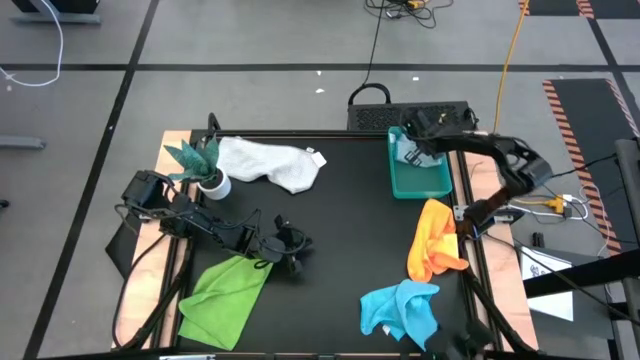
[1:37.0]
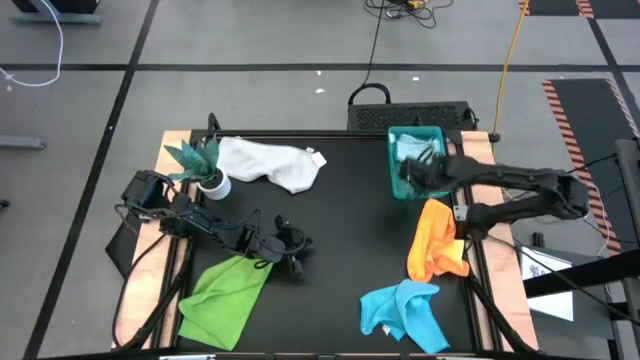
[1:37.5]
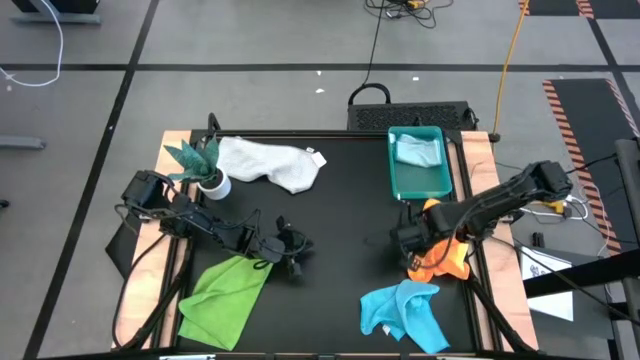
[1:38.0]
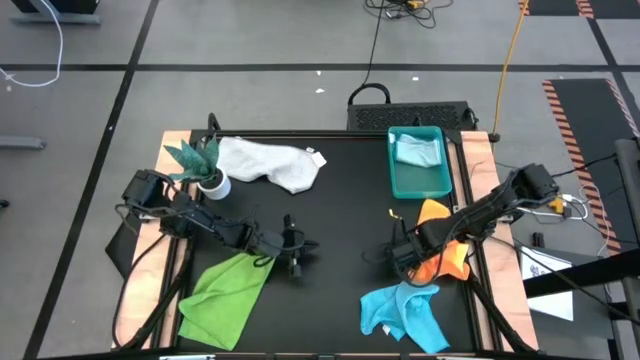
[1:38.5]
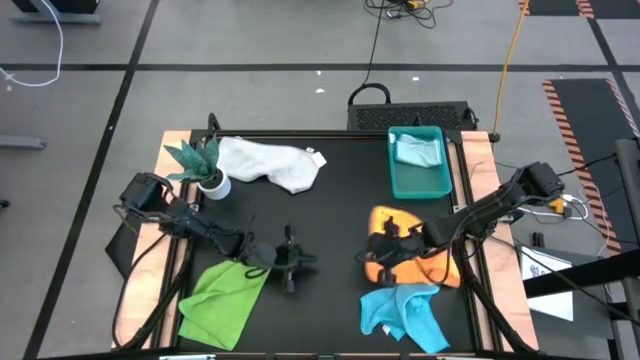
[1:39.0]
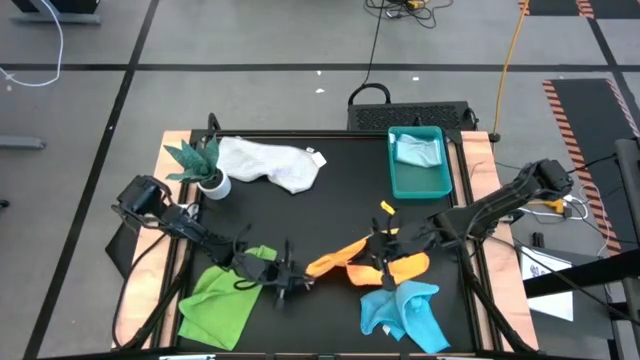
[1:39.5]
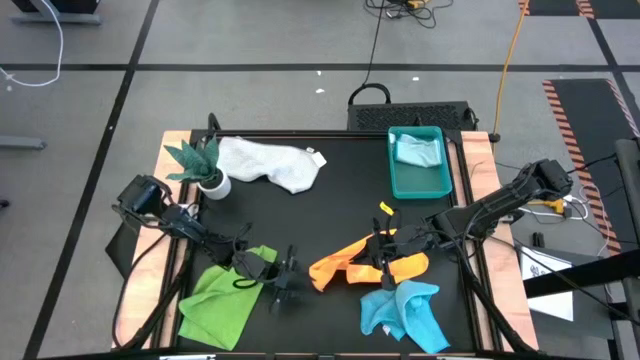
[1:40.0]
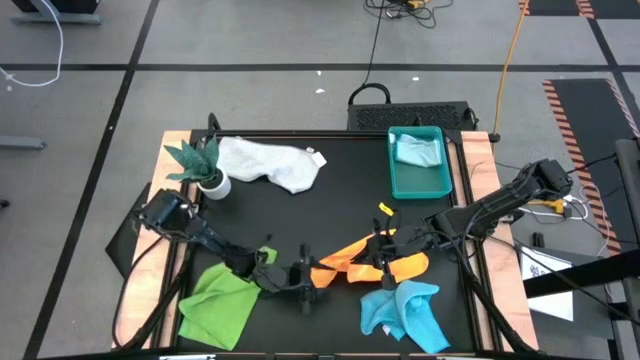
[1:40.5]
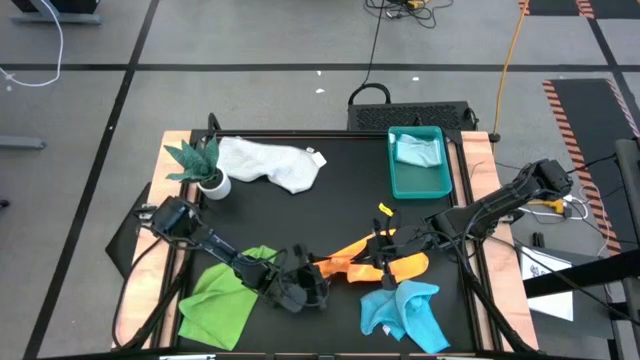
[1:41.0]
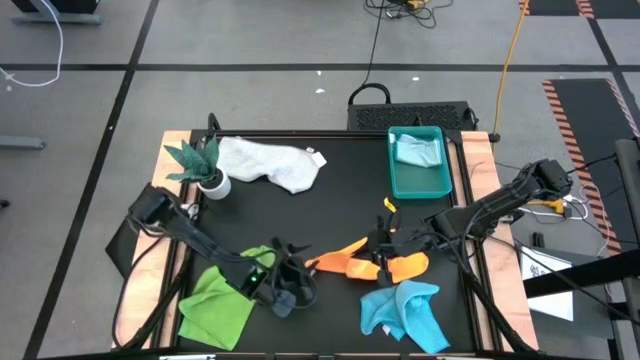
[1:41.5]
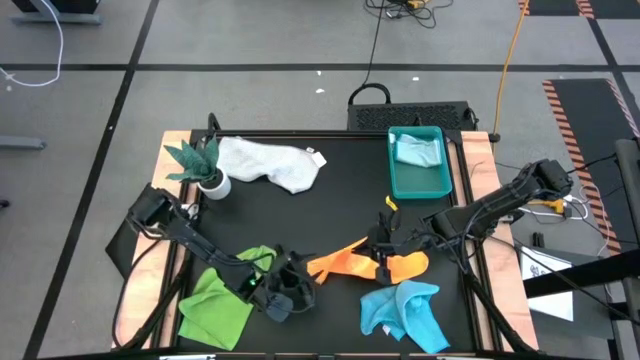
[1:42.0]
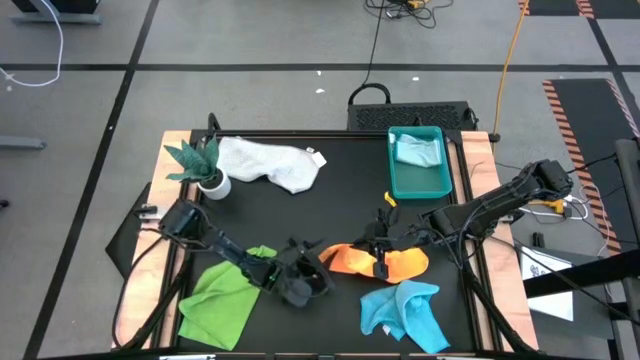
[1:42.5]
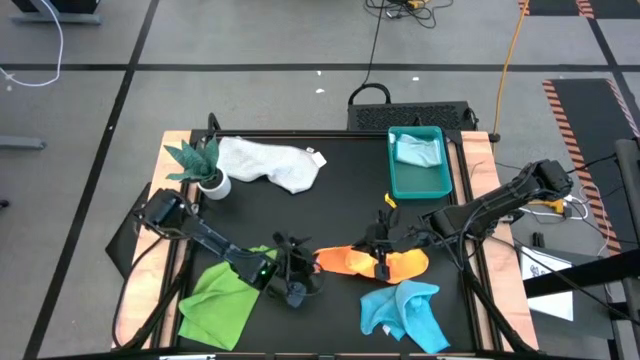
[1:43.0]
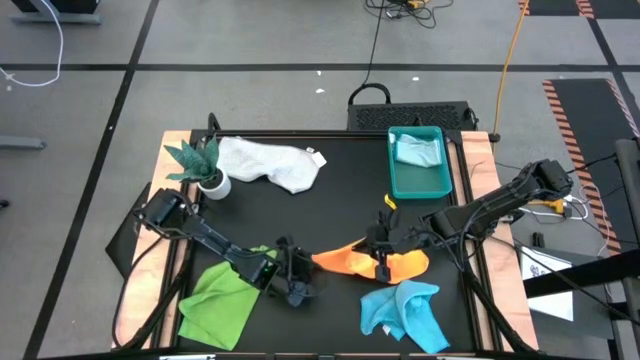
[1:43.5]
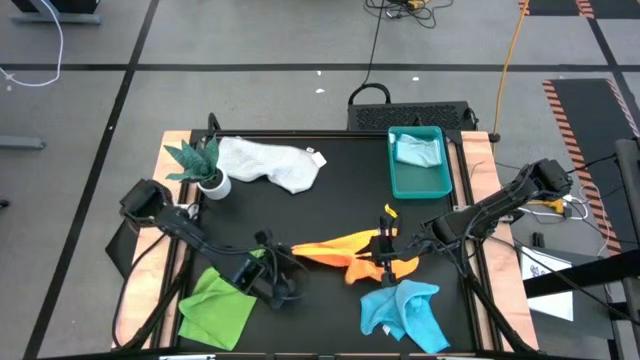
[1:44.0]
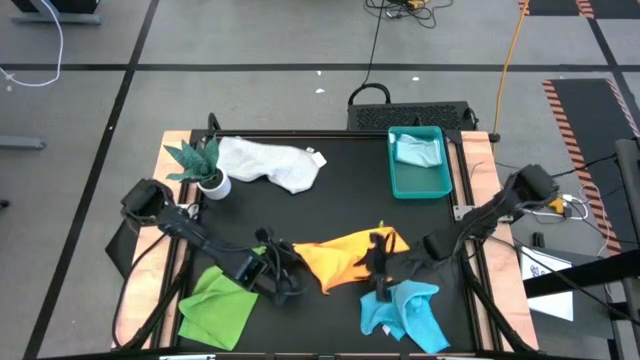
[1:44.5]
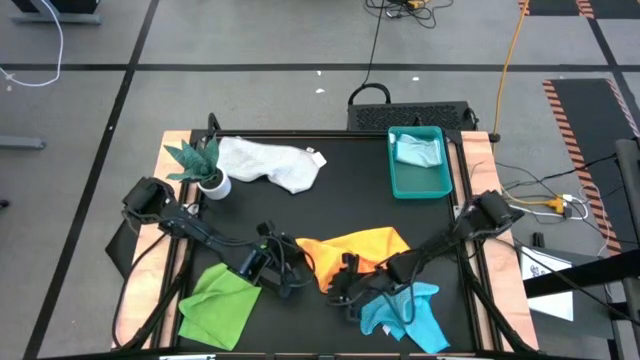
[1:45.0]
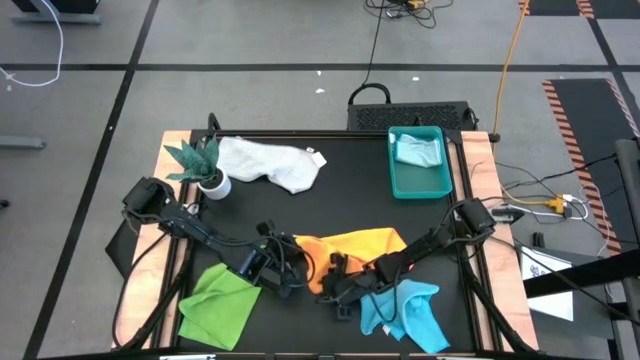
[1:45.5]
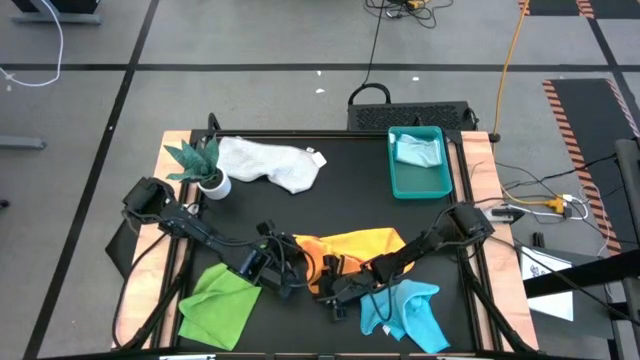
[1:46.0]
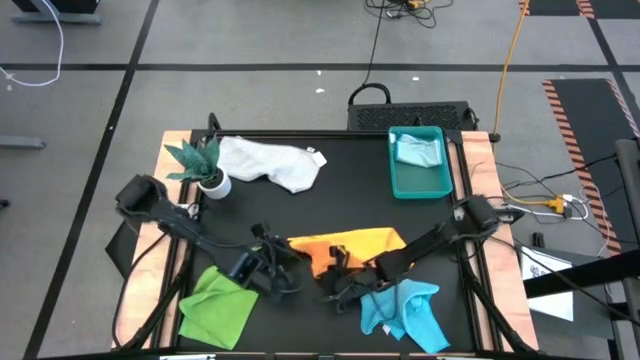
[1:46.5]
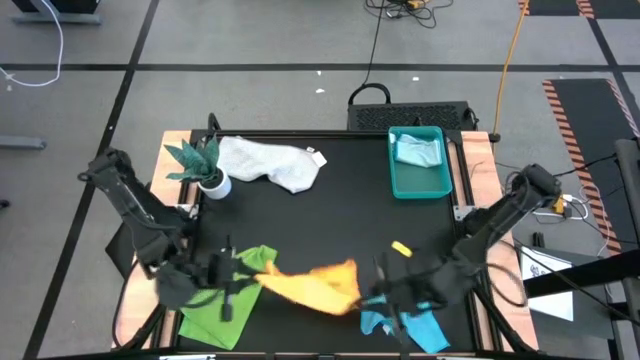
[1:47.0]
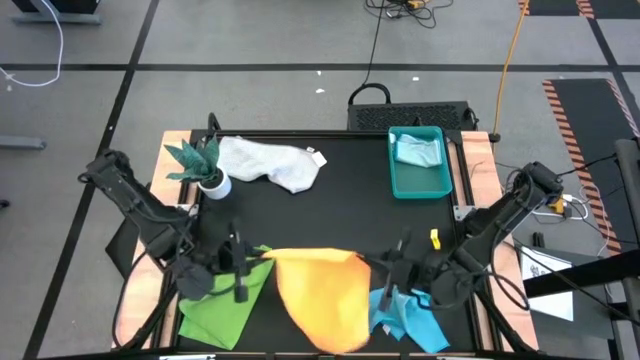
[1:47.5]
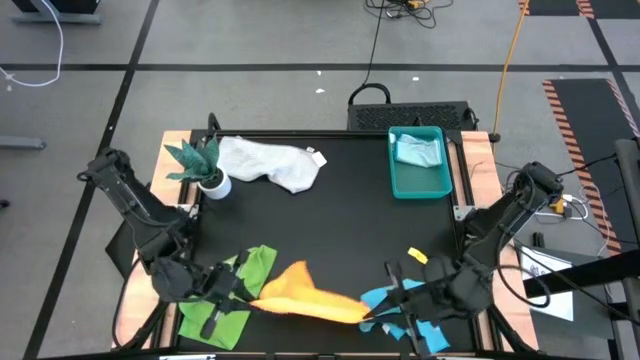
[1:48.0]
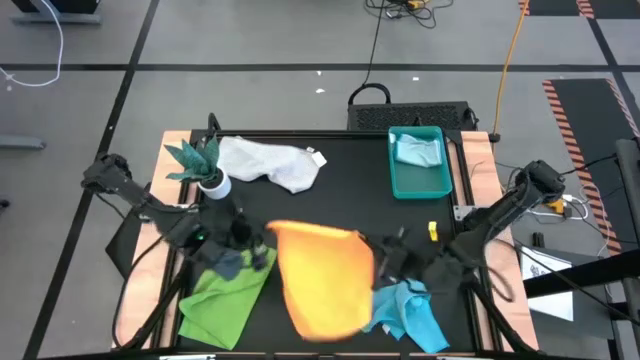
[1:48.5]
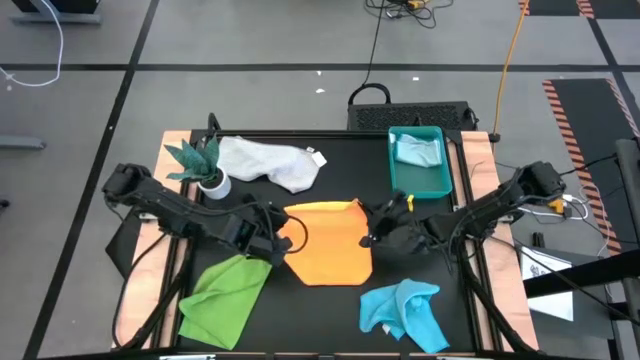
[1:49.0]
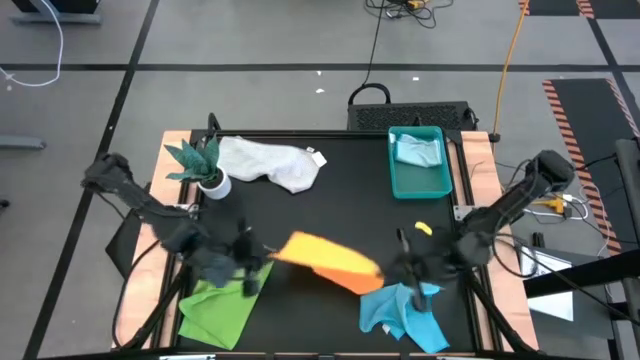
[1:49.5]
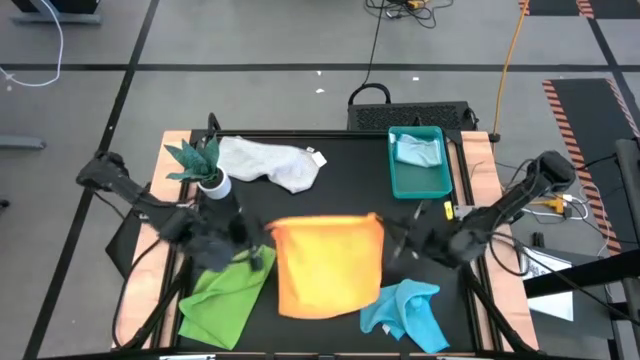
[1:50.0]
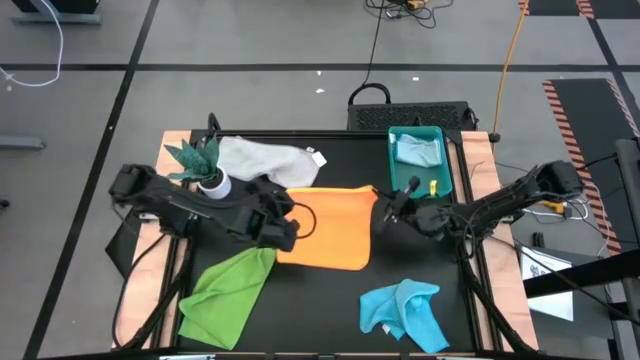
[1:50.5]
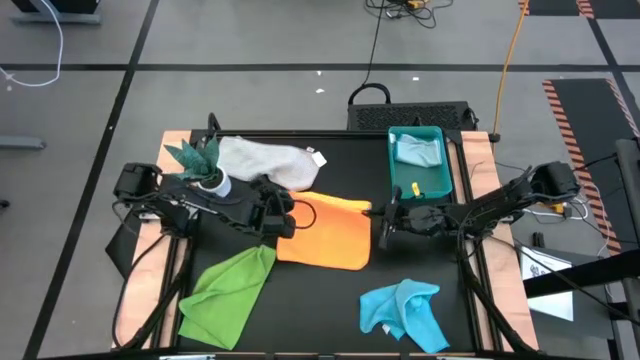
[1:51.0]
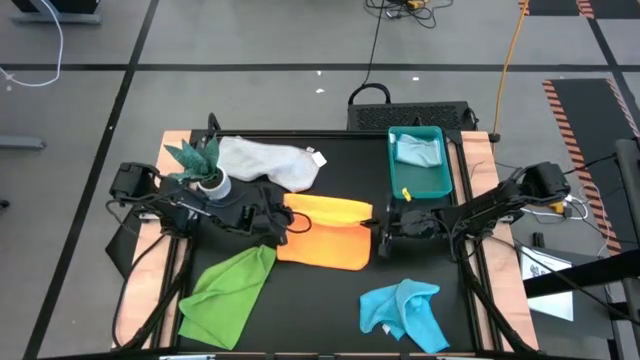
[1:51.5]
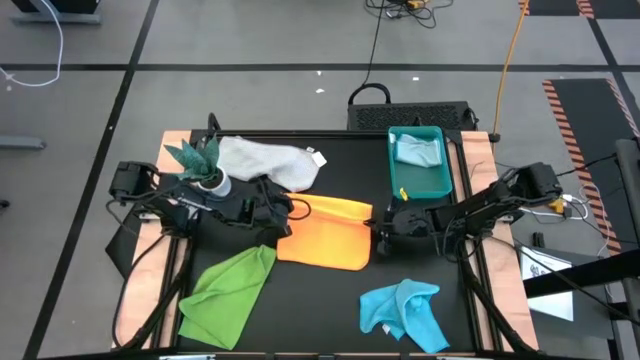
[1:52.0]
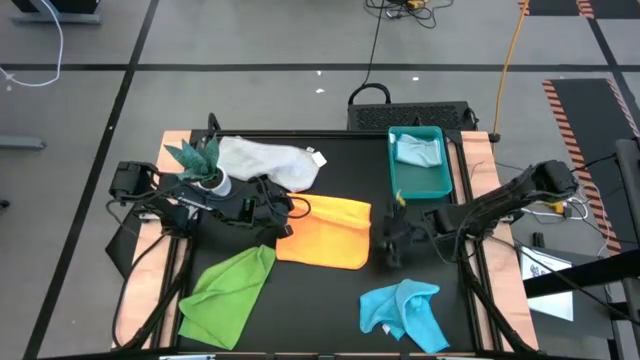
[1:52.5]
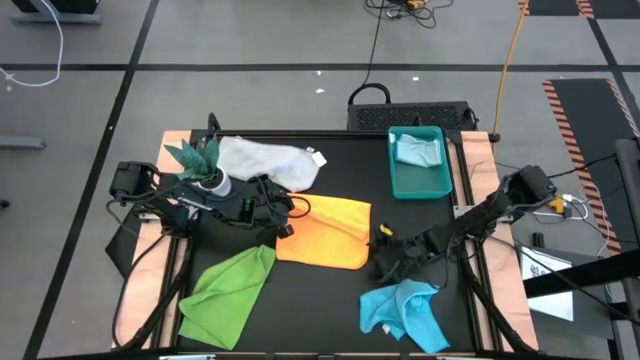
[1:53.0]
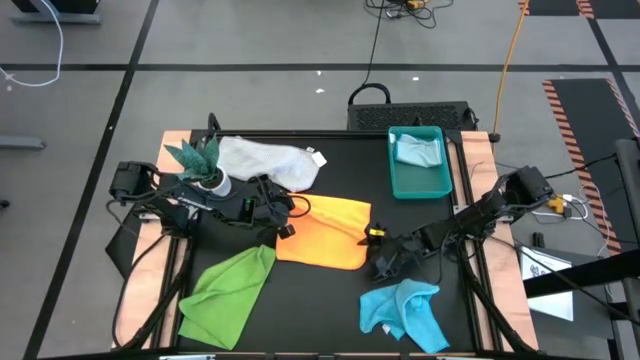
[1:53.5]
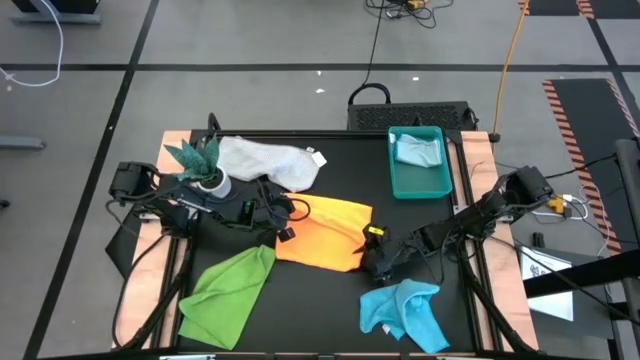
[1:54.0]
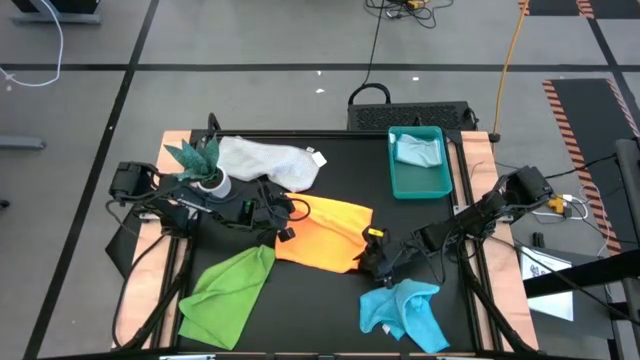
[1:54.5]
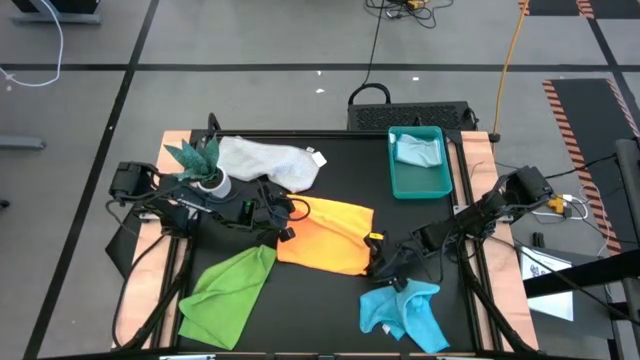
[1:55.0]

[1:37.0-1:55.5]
Task: Fold microfiber towels
Fold the orange microfiber cloth

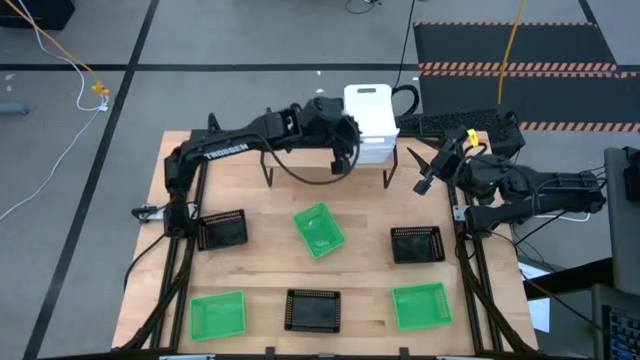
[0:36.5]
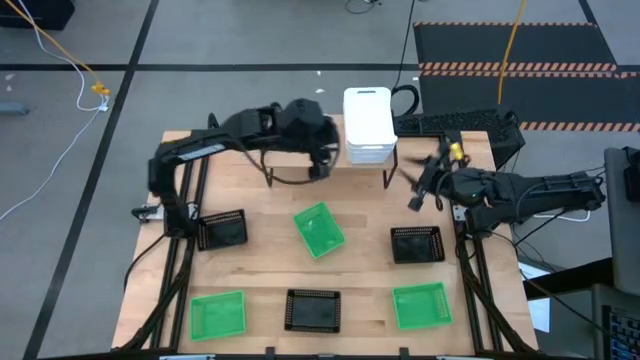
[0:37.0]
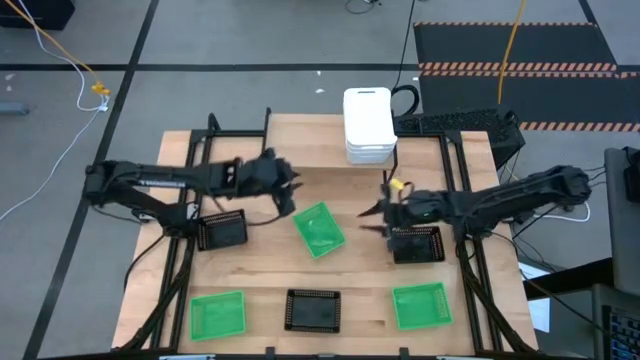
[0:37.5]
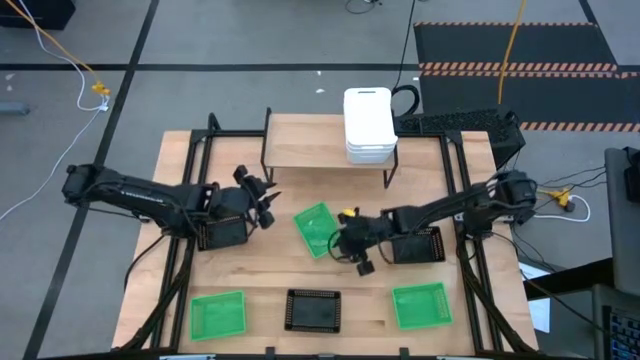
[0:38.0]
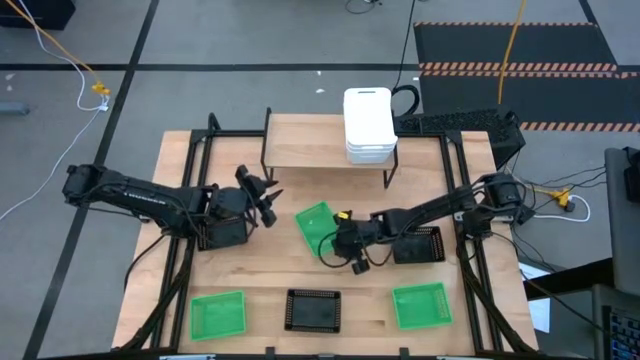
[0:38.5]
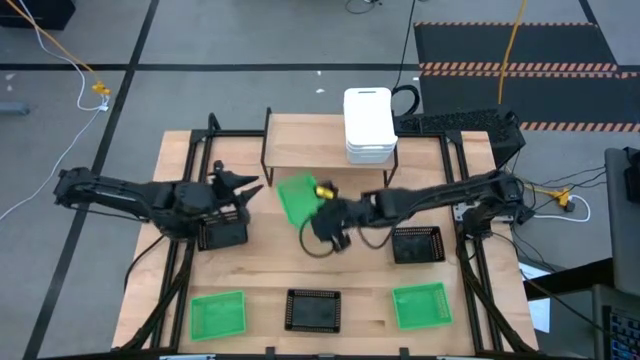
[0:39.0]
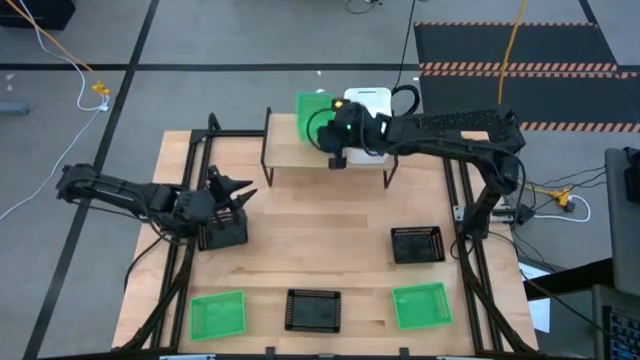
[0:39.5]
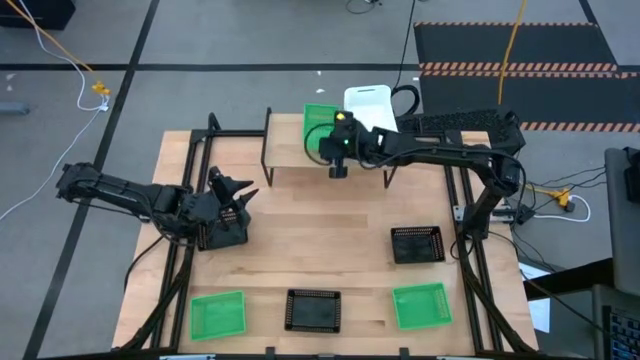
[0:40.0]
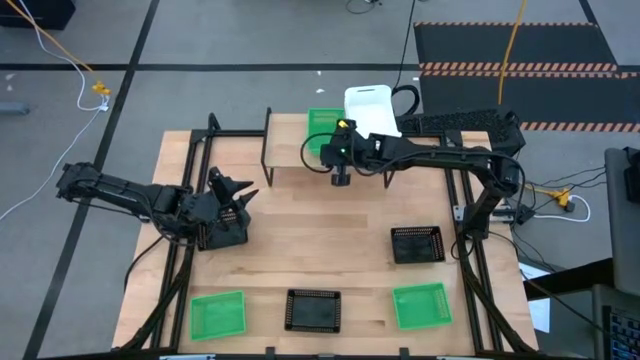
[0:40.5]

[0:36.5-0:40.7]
Task: Stack baskets on shelf by color
Put the center green bin on the shelf
